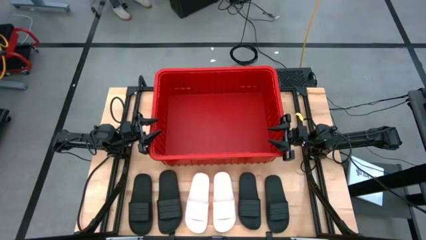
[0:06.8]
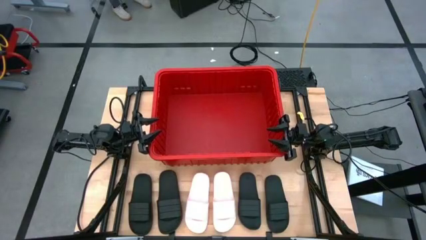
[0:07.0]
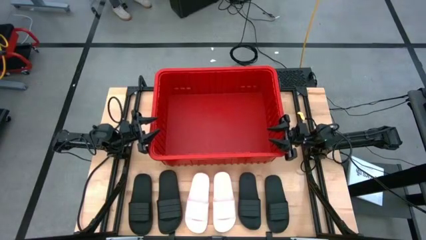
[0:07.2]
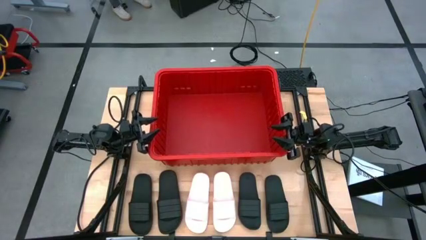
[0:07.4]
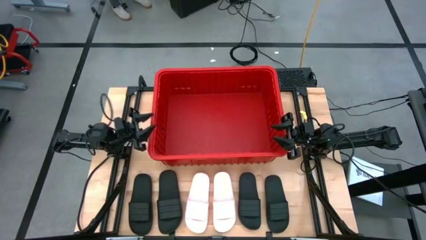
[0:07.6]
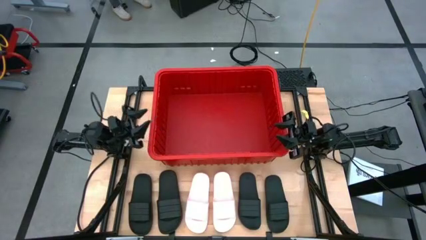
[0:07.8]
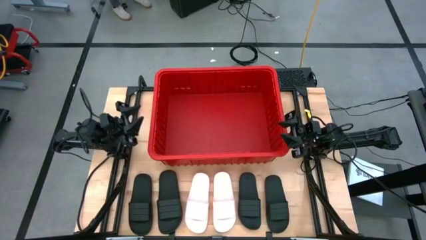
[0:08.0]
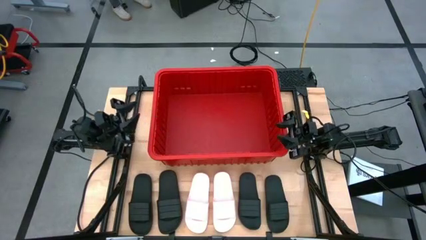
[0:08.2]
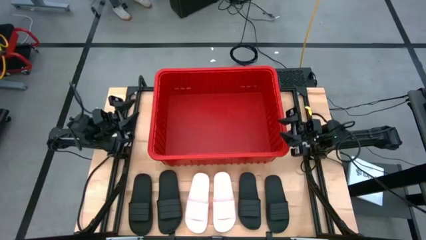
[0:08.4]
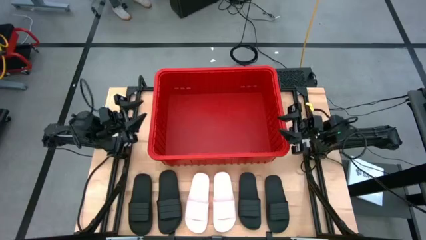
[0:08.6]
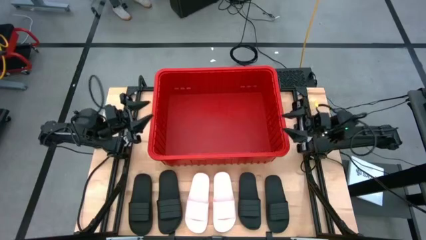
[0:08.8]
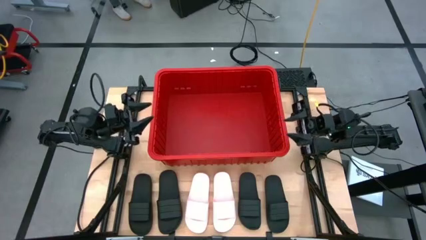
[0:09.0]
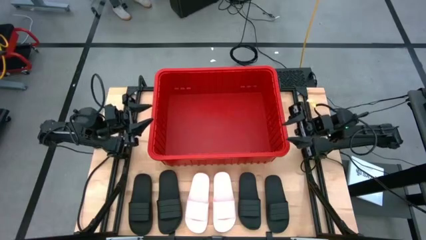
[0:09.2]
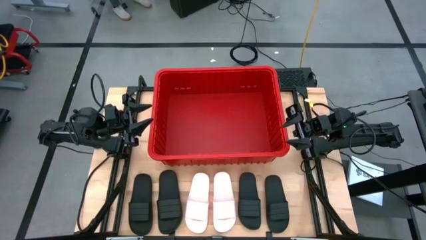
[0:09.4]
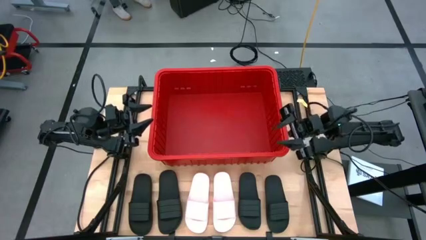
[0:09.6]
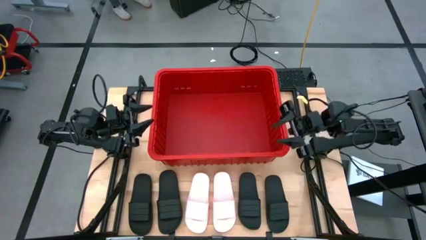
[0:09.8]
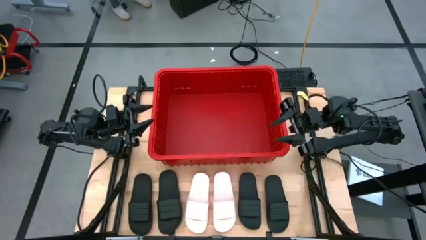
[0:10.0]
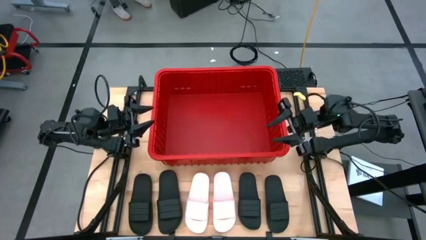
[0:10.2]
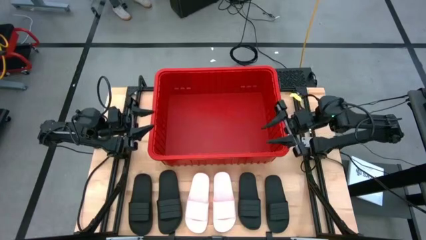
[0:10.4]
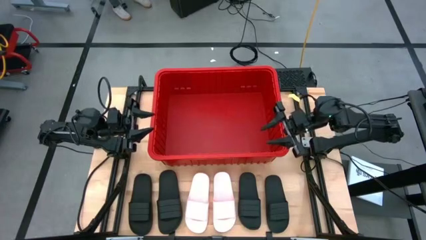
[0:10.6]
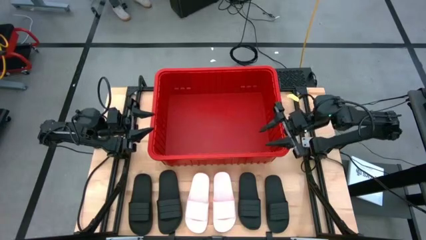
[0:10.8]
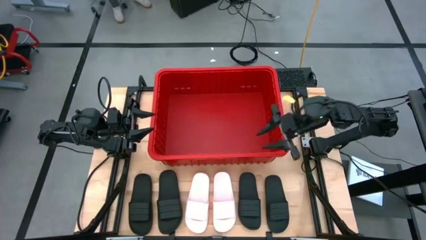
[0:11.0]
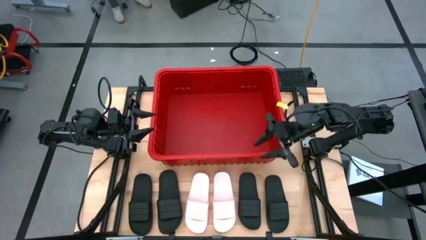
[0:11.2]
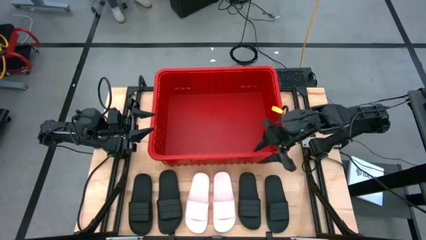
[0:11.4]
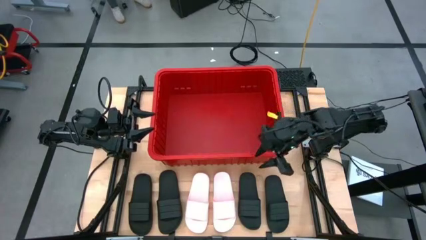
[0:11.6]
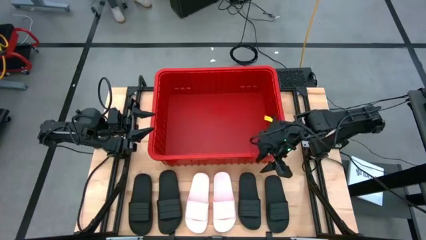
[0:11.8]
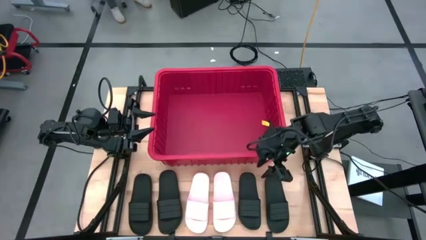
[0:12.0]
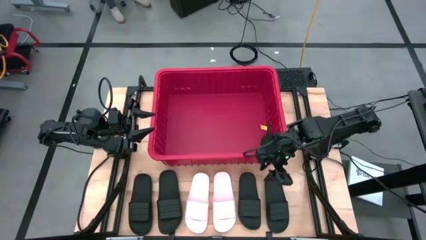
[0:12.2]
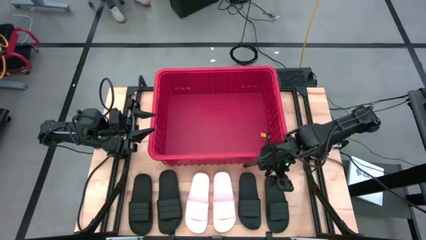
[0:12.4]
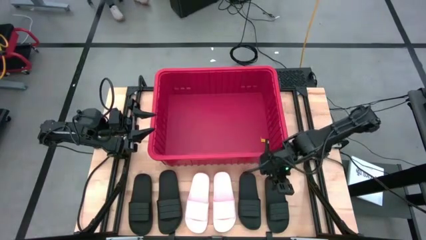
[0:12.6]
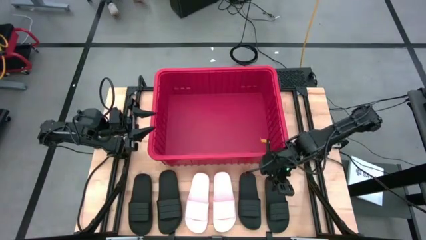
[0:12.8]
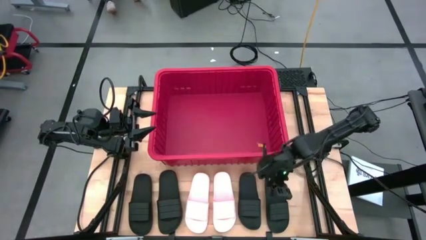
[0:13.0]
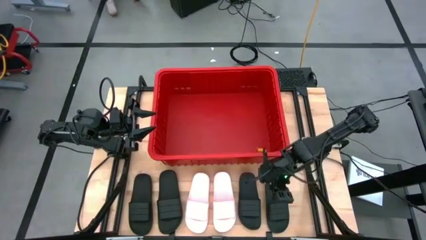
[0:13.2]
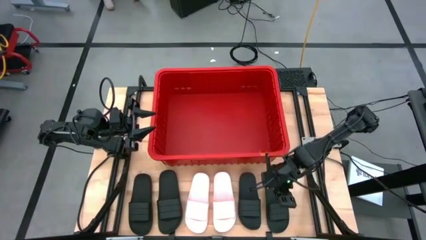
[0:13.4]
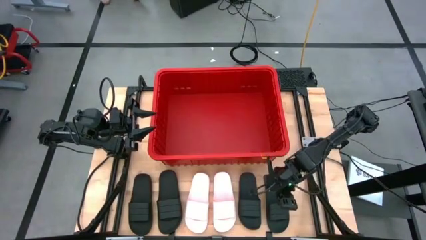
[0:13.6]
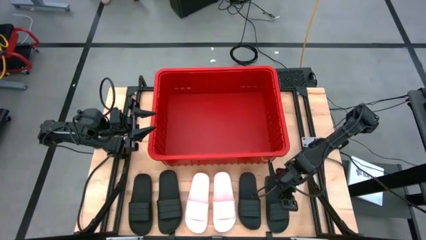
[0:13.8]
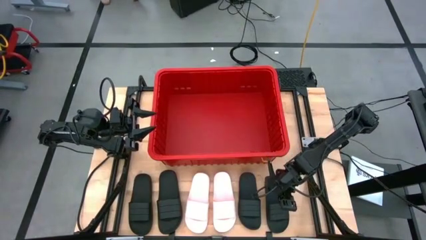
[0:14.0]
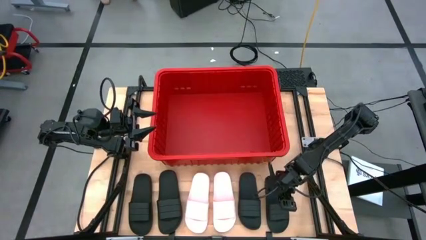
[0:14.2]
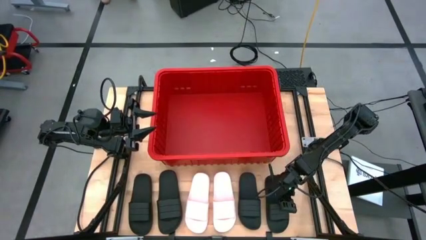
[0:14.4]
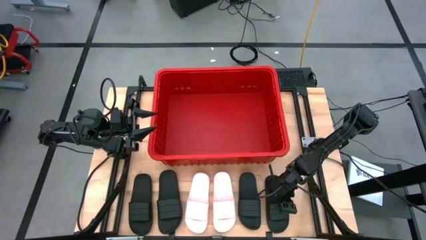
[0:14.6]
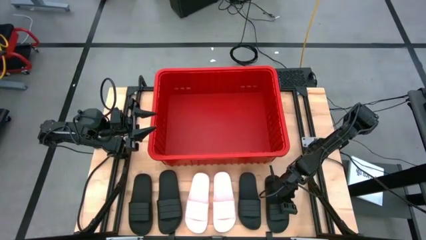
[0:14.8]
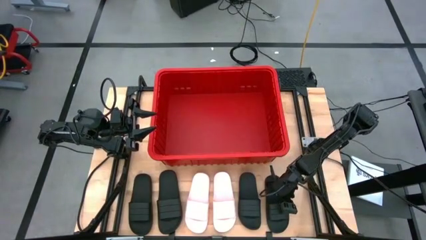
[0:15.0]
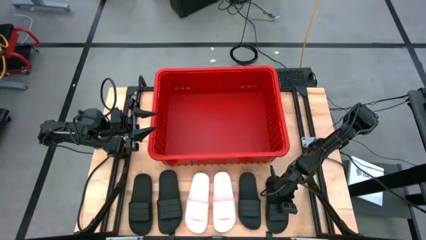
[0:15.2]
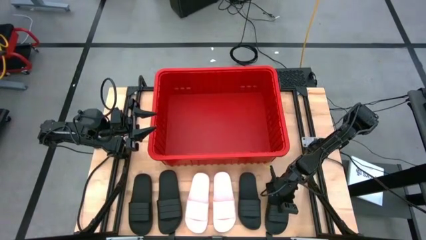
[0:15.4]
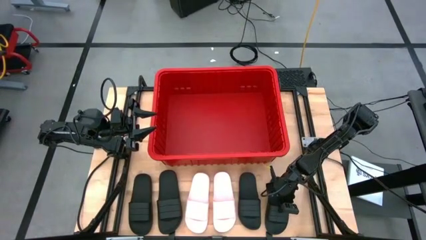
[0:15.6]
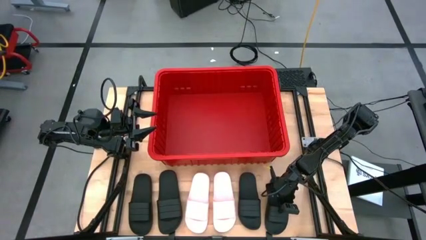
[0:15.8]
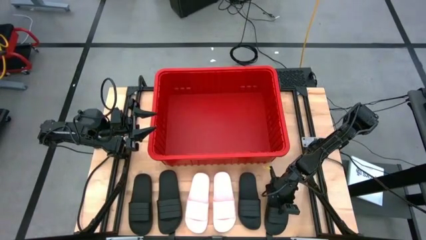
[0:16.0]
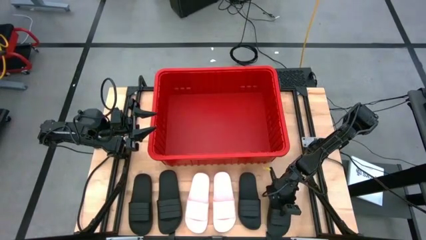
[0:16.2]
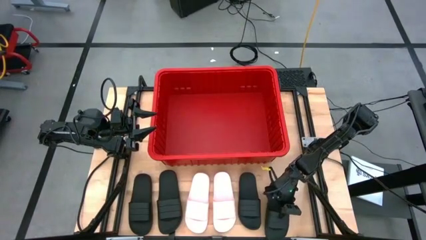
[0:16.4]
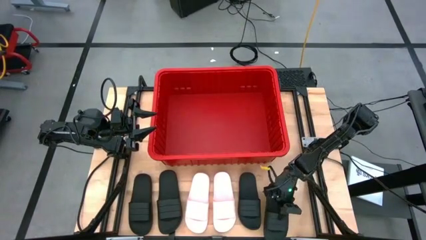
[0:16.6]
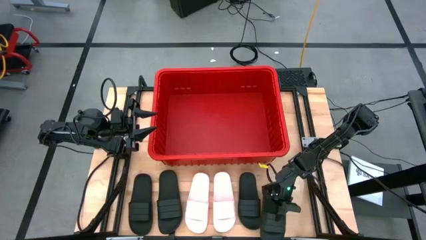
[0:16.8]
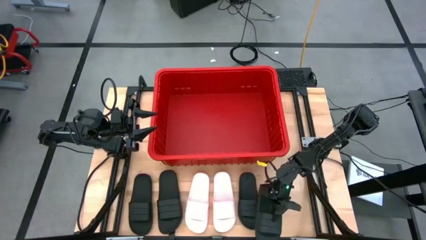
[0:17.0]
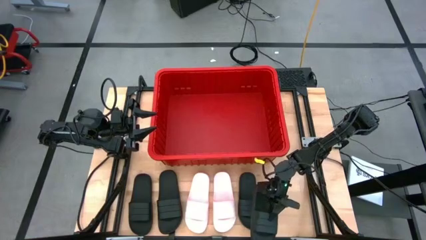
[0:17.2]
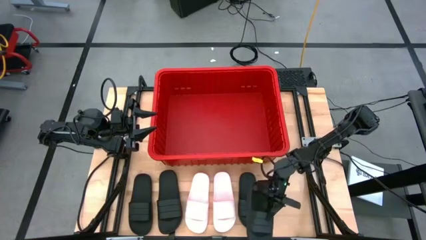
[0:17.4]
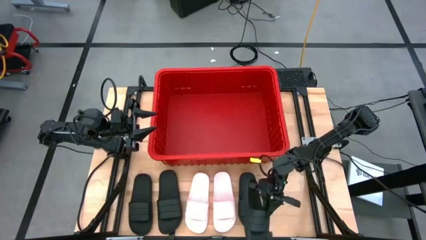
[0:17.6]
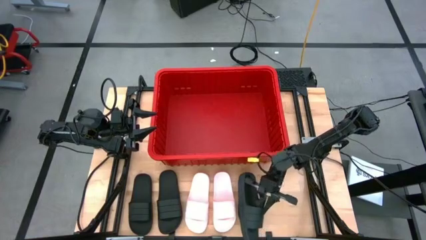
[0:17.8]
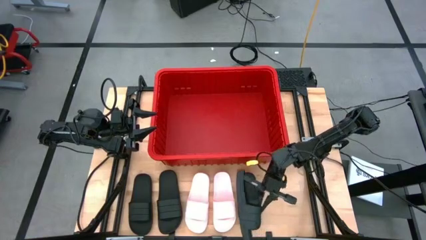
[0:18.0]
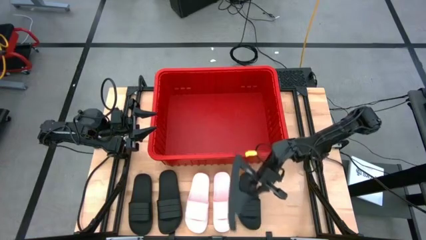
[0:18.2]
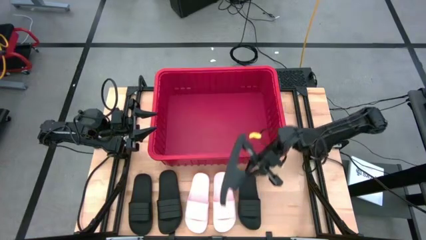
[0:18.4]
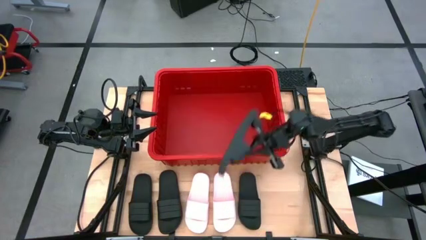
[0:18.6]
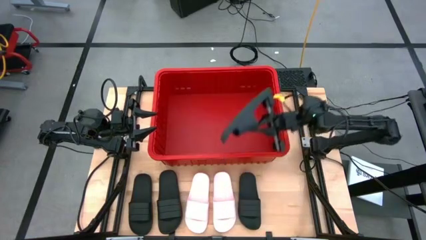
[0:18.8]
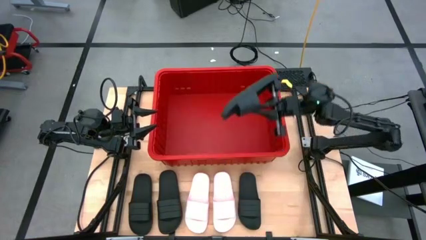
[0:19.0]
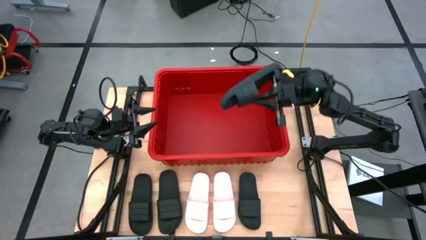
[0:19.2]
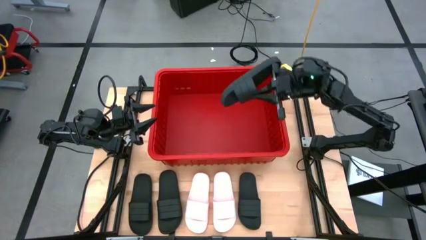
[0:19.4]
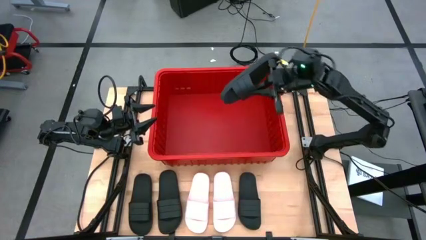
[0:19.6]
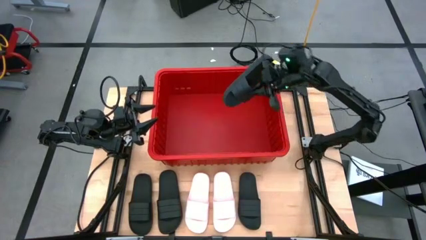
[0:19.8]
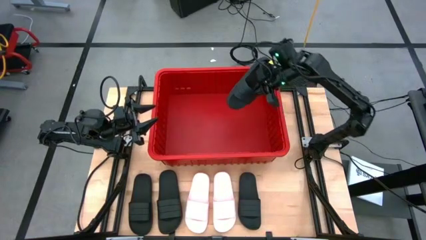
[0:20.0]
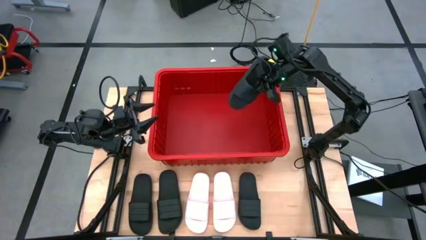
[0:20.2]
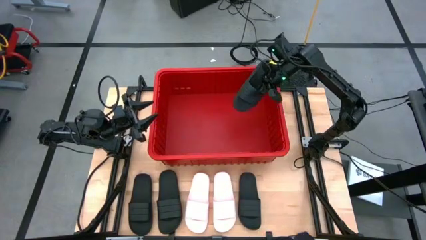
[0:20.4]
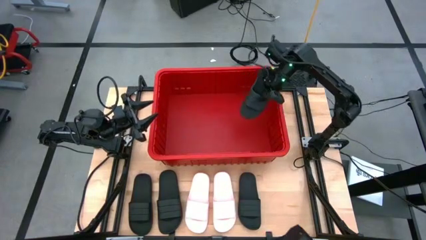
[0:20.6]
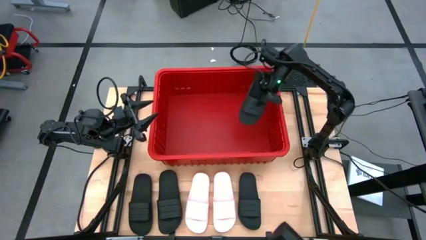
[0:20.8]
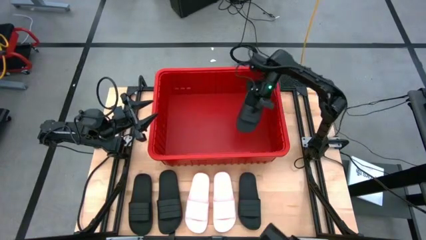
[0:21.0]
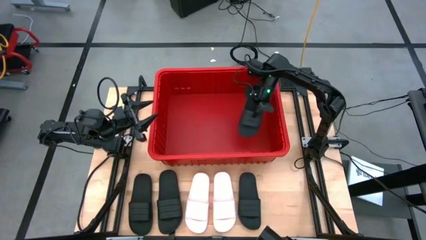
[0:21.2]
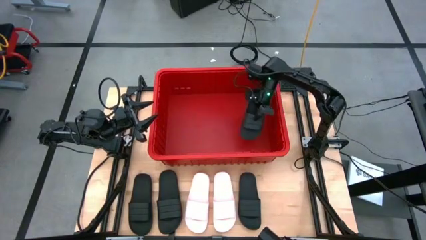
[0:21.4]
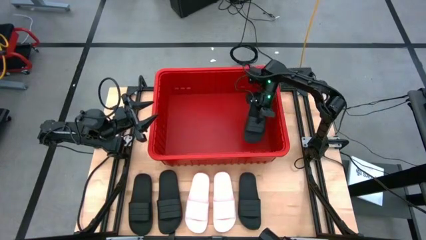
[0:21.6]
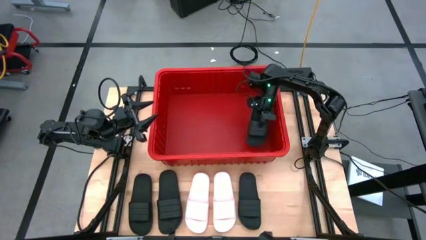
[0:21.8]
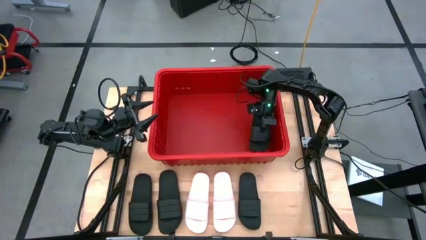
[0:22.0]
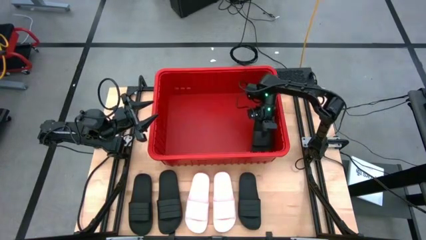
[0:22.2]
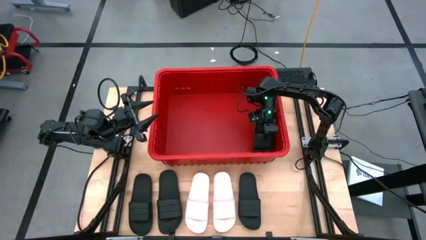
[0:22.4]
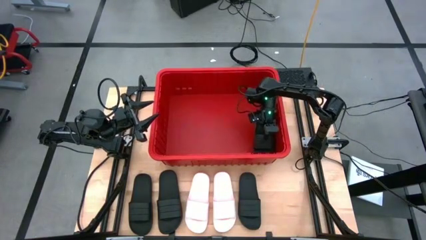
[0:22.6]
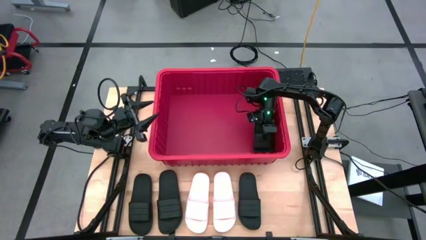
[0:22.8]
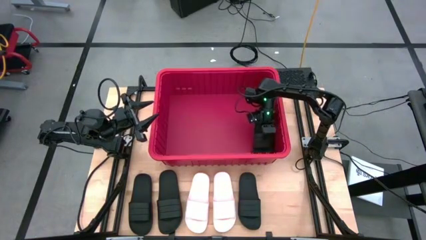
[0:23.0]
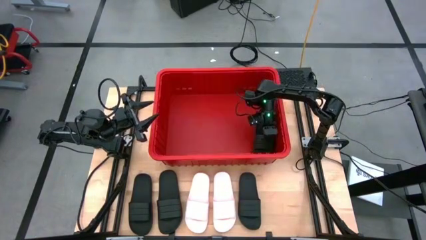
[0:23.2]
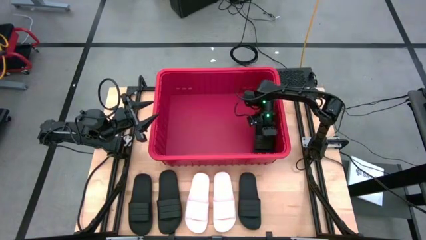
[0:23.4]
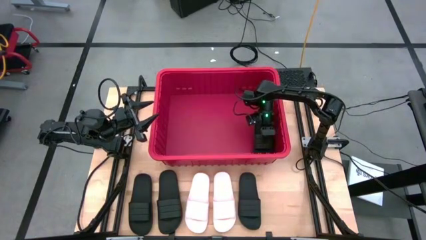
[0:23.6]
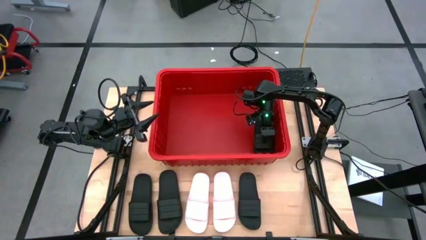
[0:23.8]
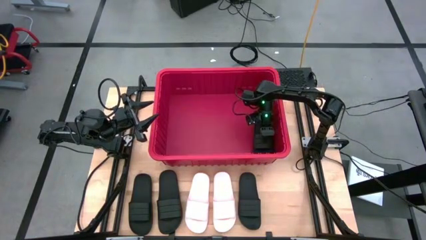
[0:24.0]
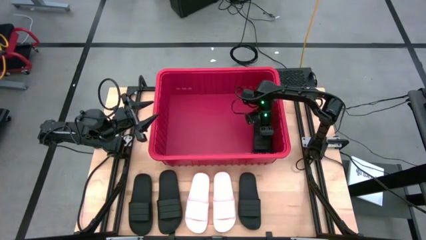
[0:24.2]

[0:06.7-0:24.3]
Task: Pick and place slides into bin
Put the black slide into the red container
